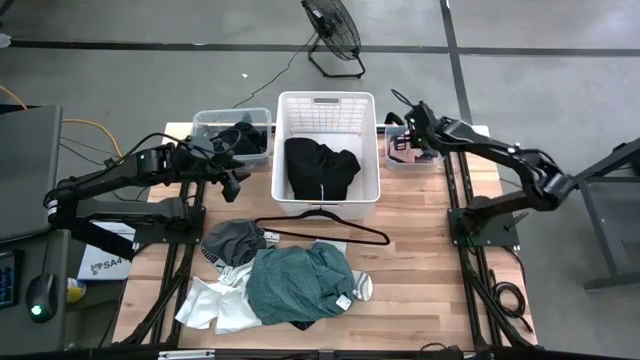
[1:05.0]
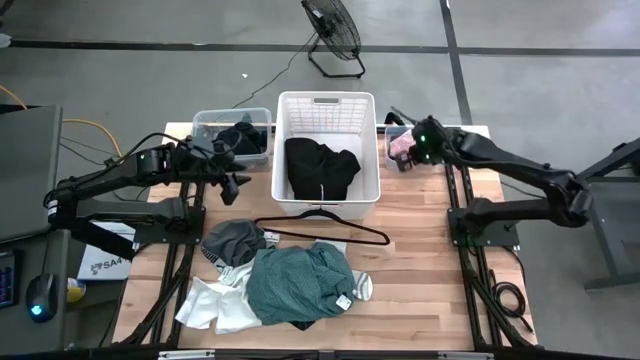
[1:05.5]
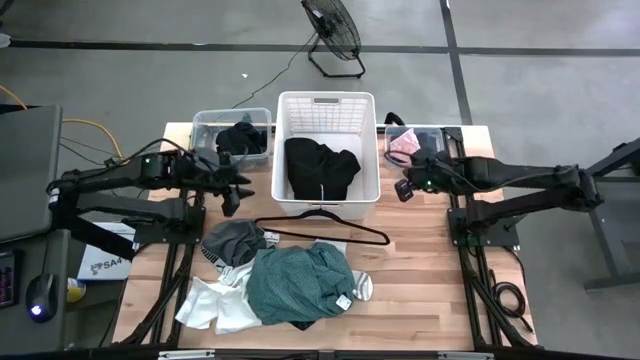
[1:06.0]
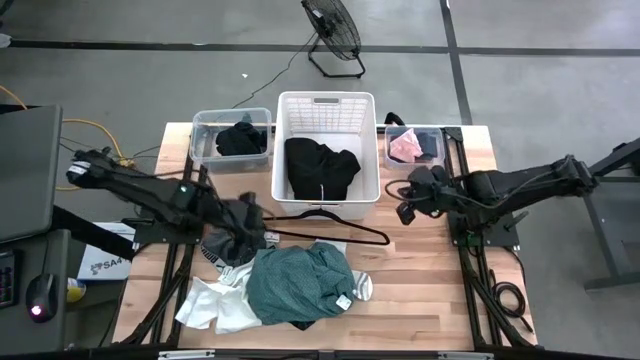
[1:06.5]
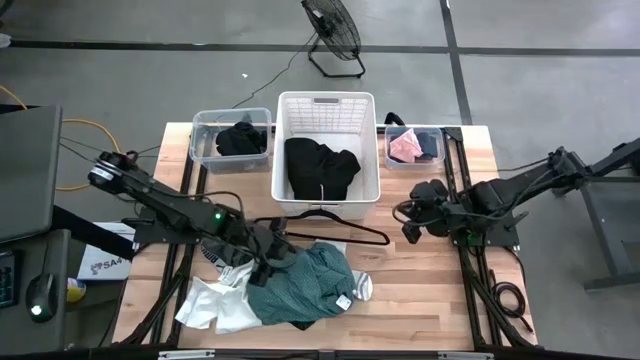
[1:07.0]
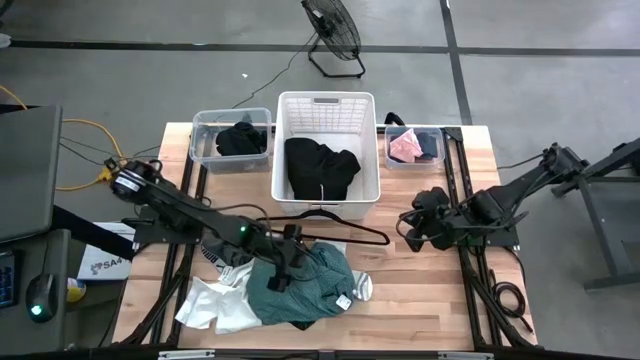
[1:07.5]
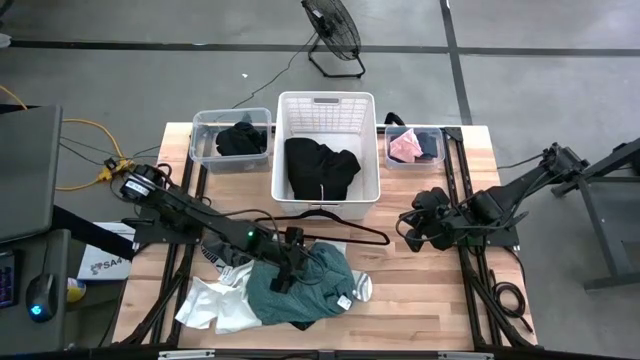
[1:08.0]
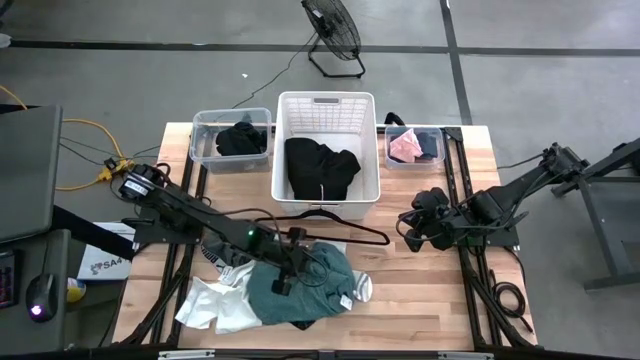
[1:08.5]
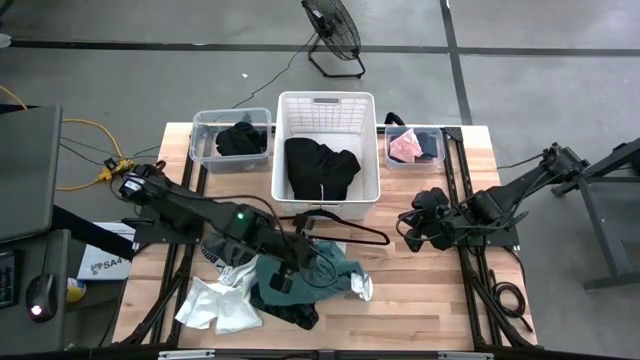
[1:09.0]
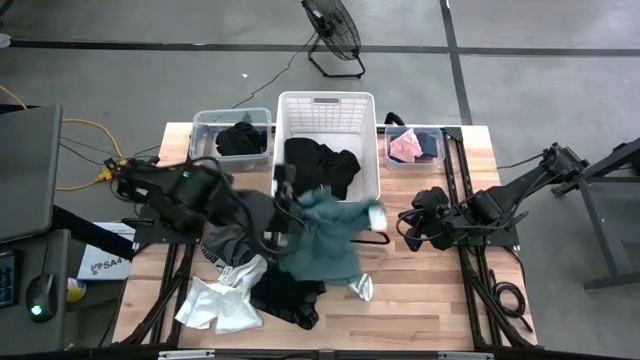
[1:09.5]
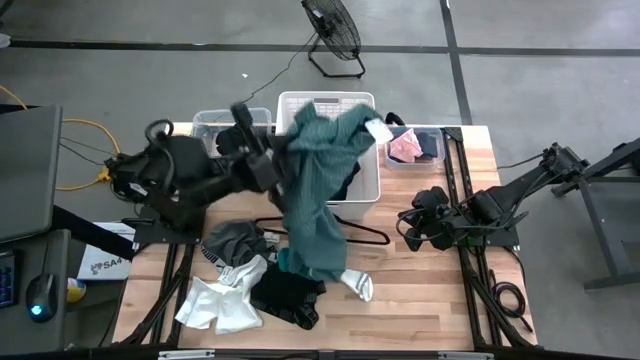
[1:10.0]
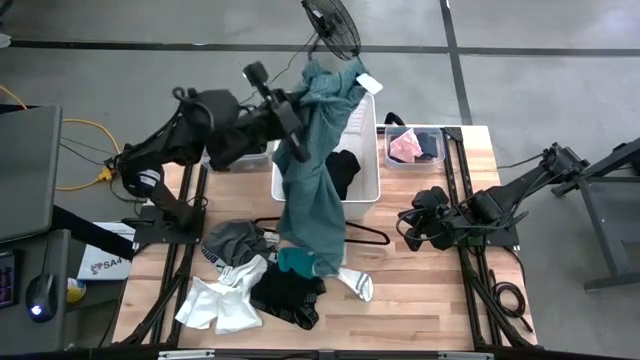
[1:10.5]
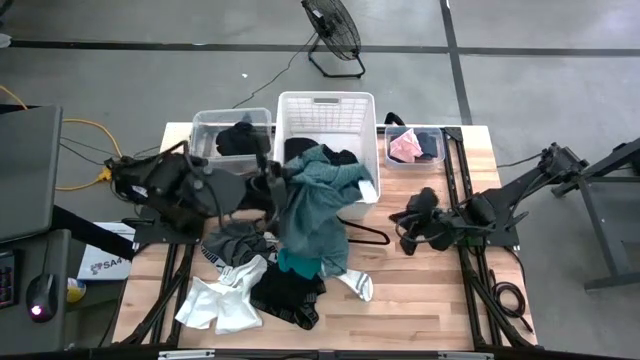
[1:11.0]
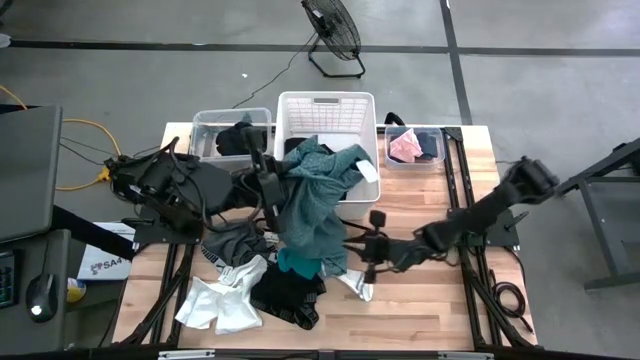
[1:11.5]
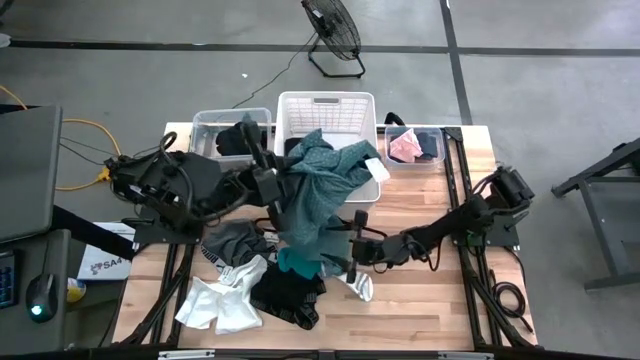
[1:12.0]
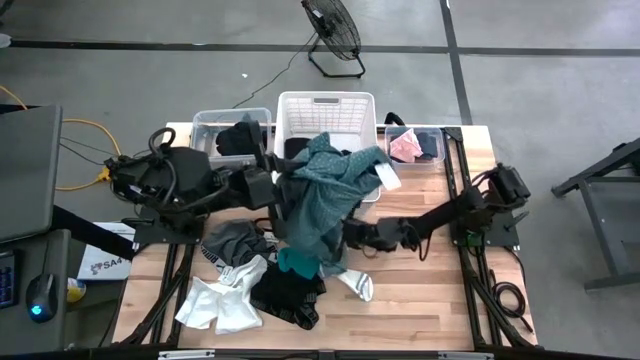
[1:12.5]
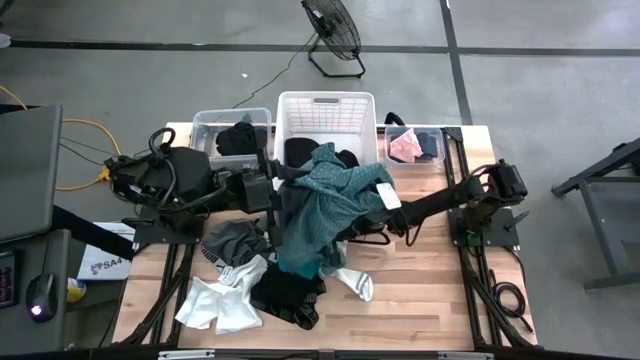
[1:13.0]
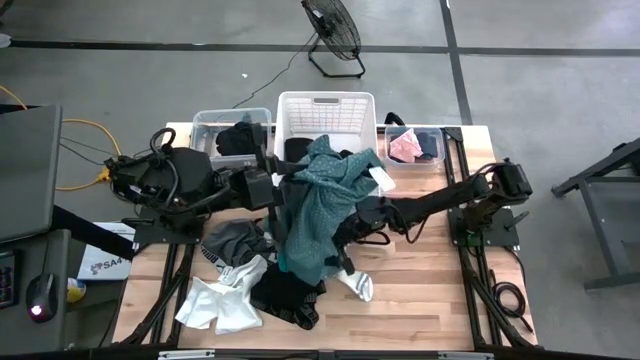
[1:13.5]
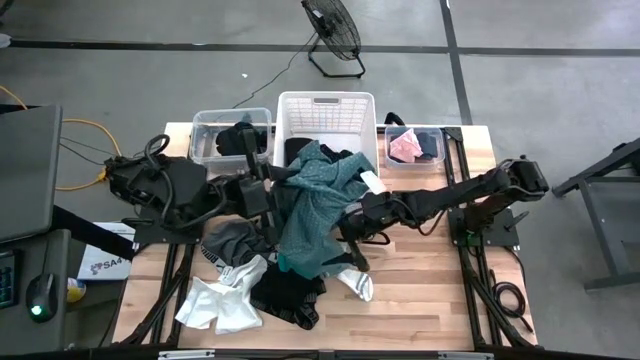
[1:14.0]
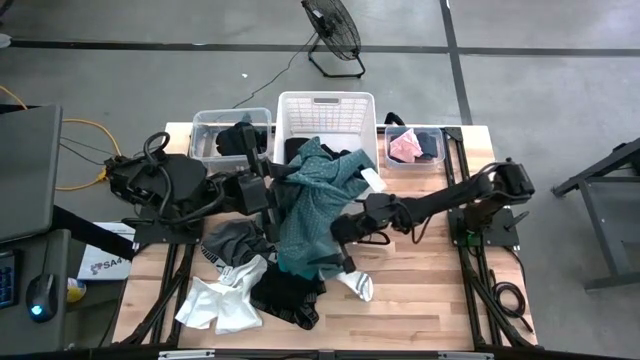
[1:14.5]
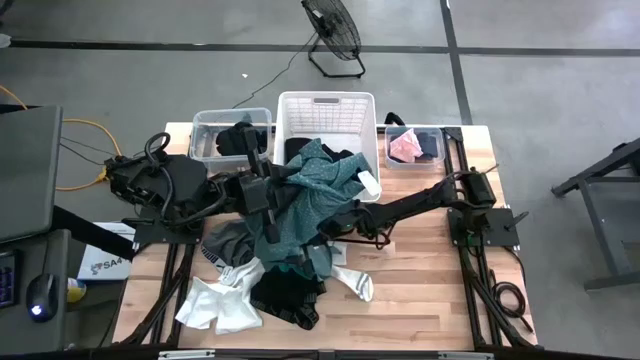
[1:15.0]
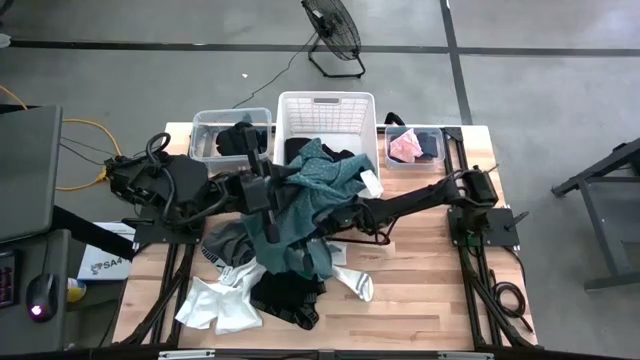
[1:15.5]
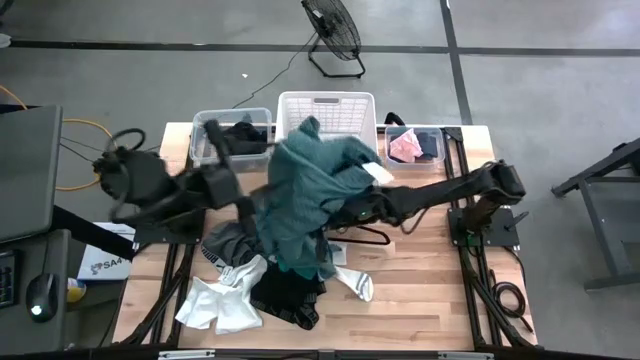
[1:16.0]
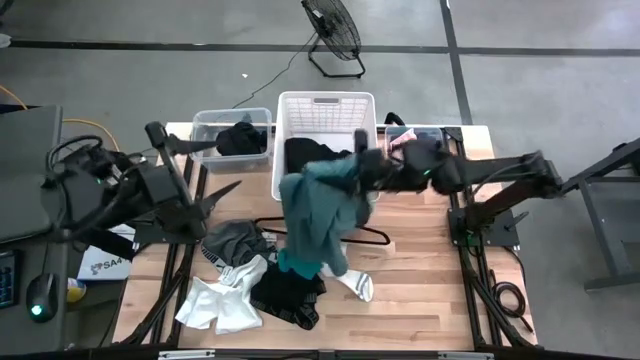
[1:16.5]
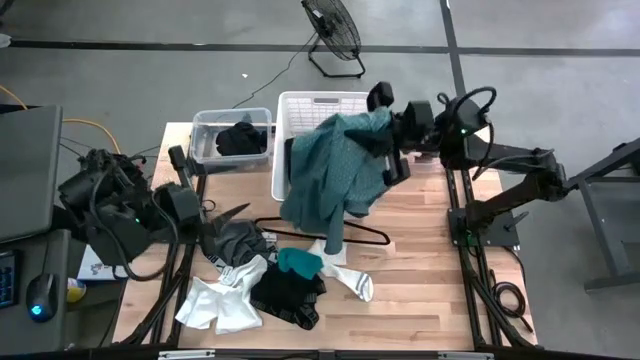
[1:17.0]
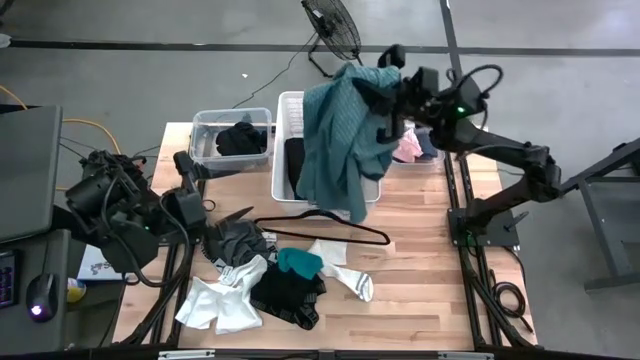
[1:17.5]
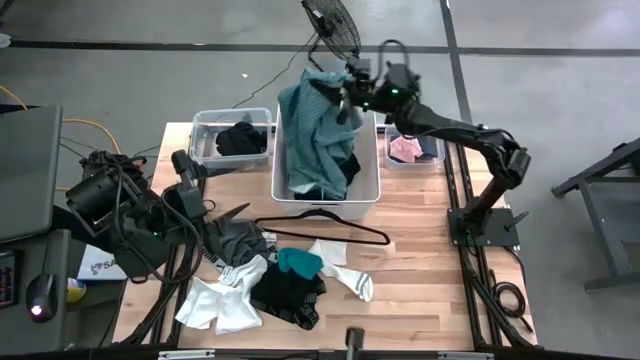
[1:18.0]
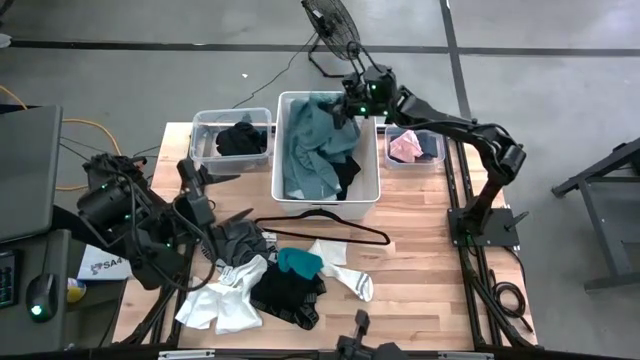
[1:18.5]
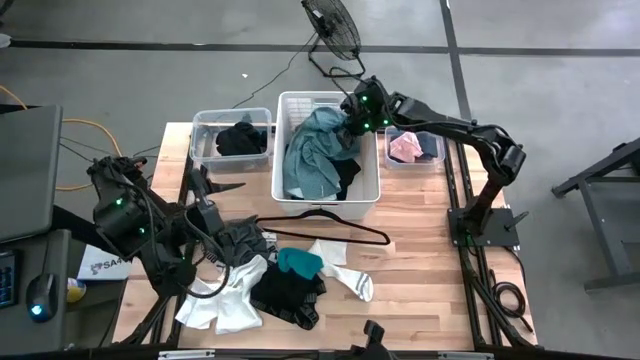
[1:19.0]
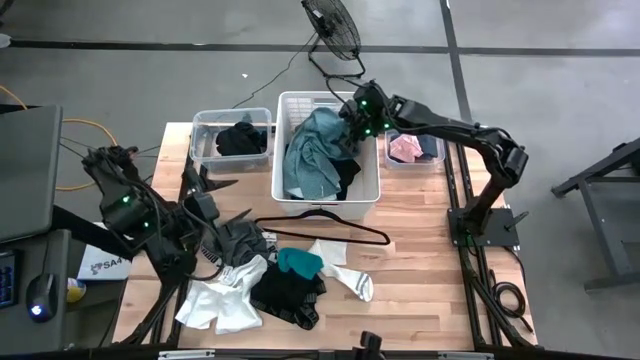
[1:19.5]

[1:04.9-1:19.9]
Task: Pick & Place Cloths
Put the blue green polo shirt into the white laundry basket

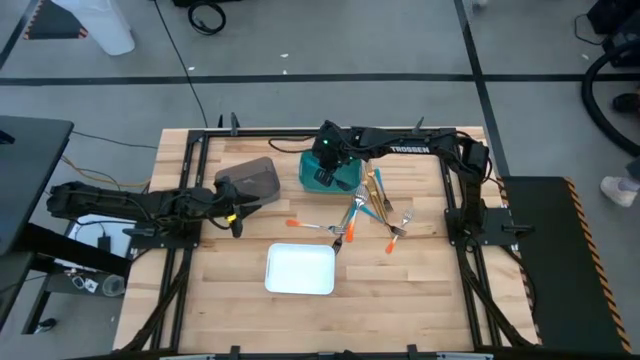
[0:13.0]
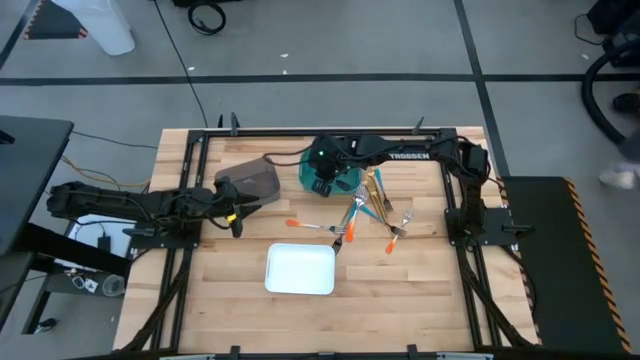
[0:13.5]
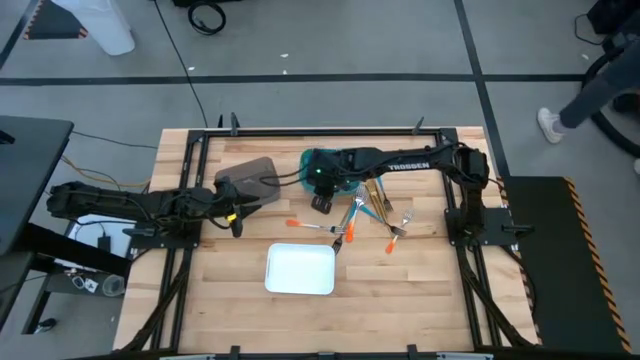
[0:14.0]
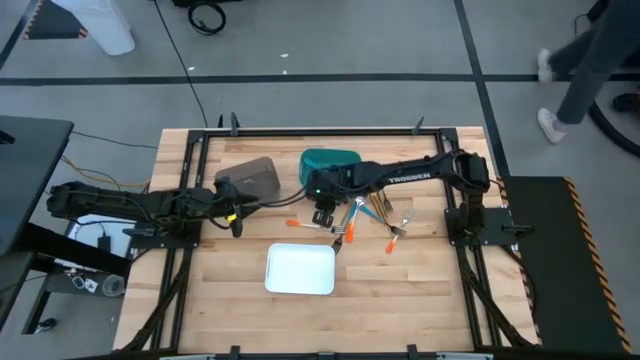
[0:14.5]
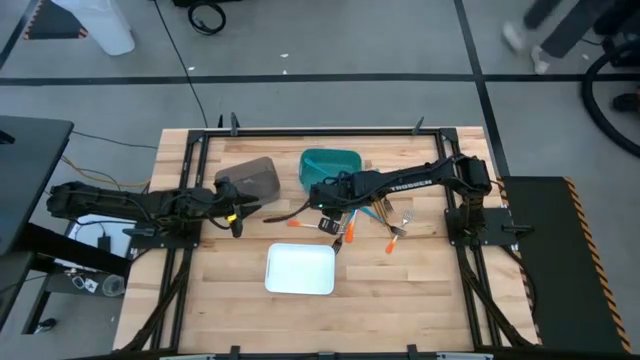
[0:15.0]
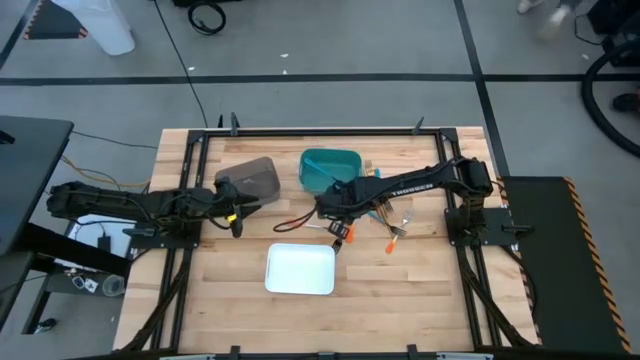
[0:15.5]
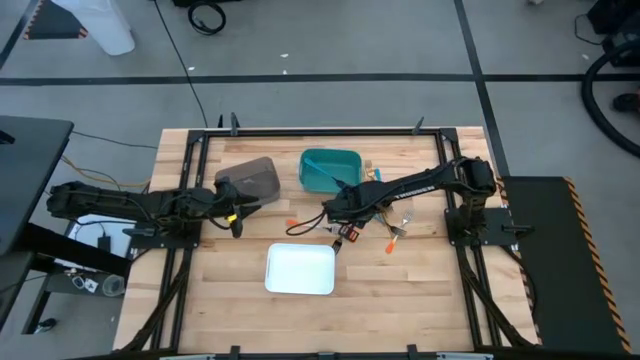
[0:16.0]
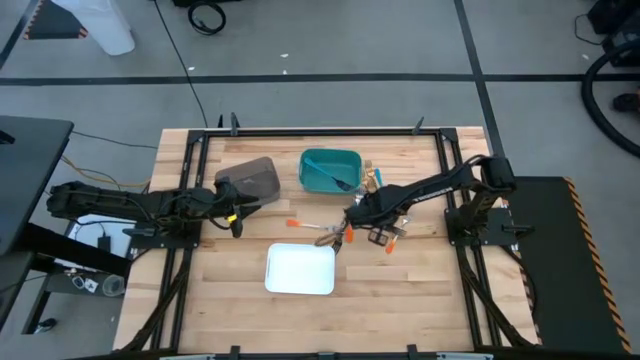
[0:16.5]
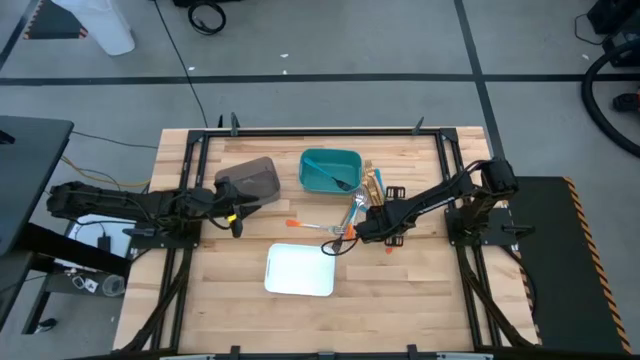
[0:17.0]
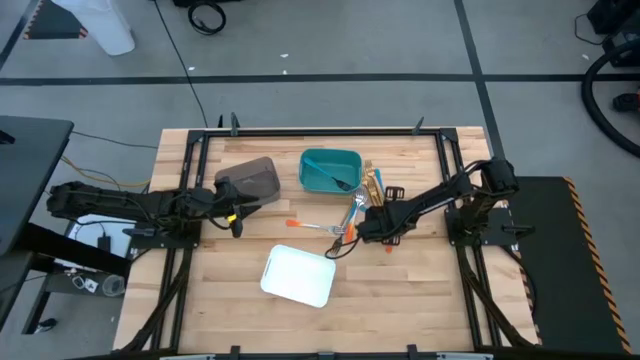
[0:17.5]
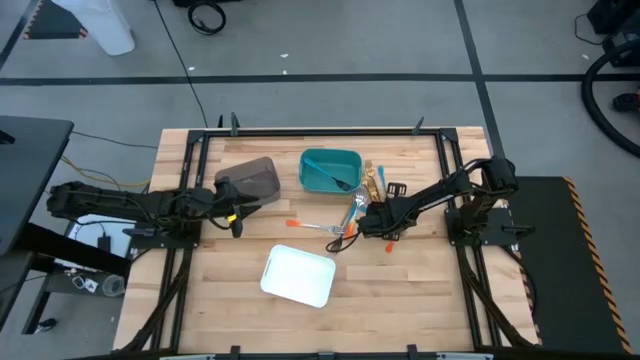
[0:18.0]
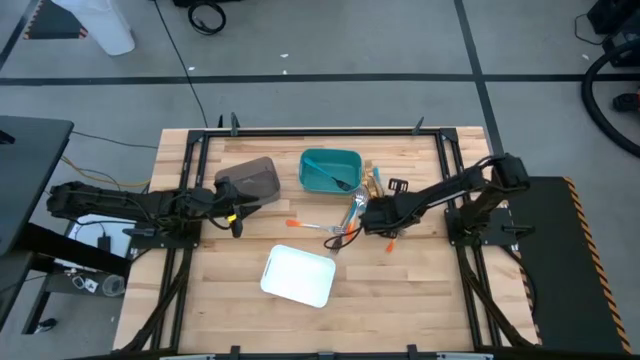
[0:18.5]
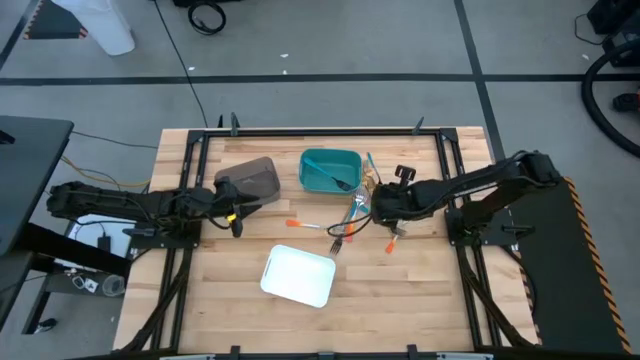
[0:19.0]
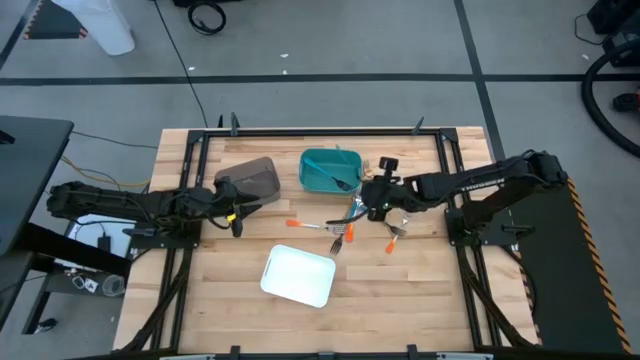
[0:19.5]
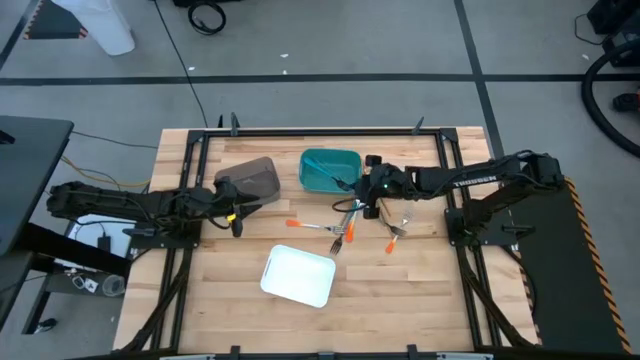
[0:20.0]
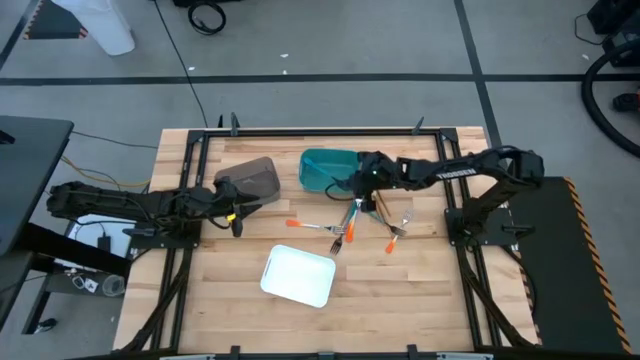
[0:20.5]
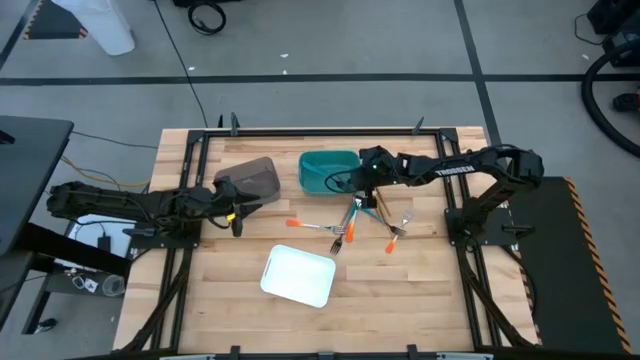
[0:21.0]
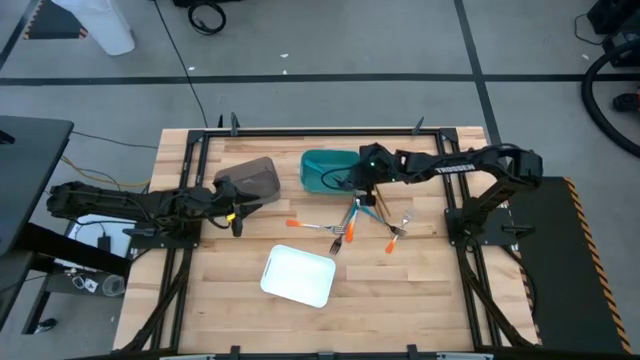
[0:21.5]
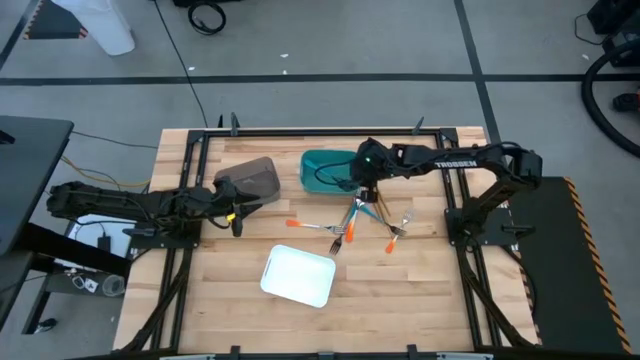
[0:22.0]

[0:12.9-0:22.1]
Task: Sort silverware by color (type)
Put the blue fork into the blue bin
